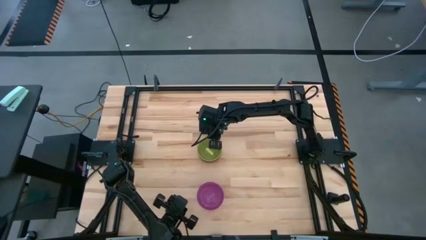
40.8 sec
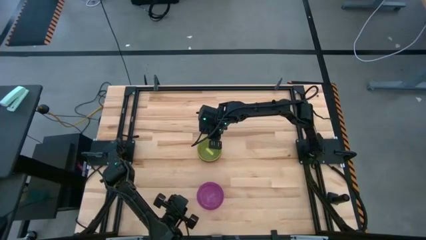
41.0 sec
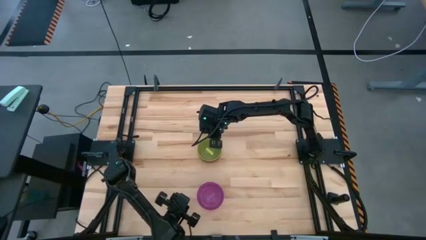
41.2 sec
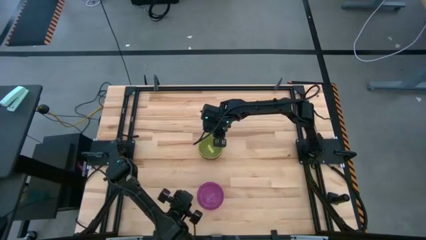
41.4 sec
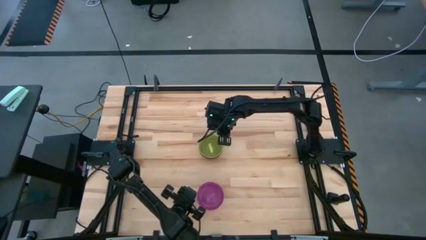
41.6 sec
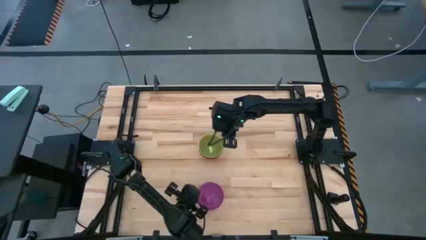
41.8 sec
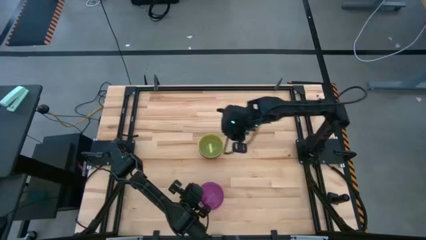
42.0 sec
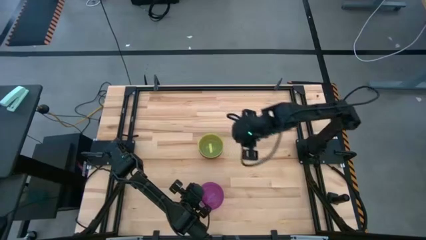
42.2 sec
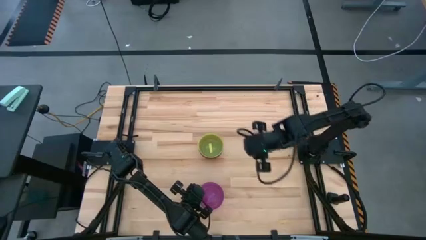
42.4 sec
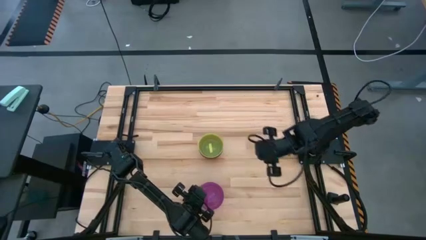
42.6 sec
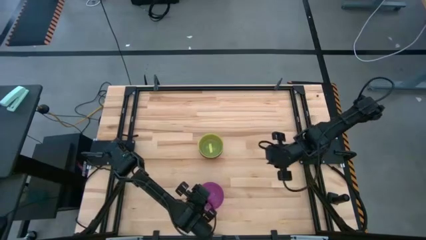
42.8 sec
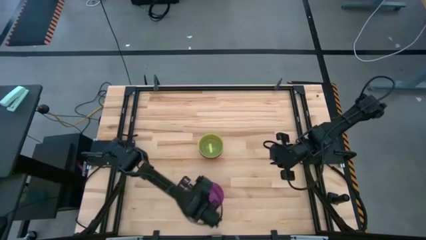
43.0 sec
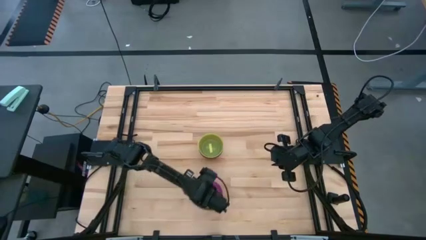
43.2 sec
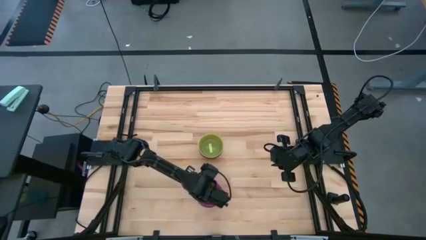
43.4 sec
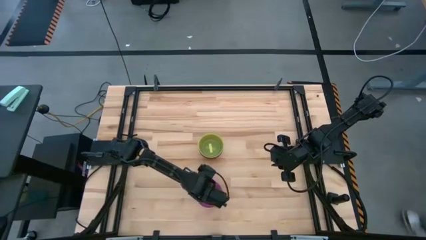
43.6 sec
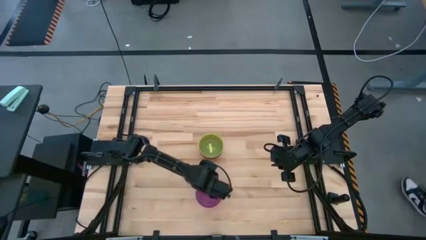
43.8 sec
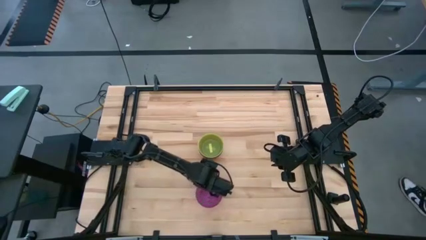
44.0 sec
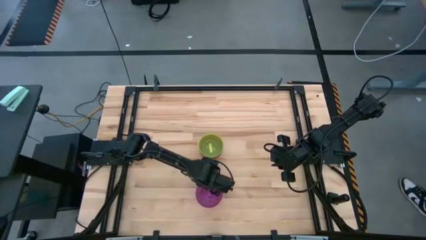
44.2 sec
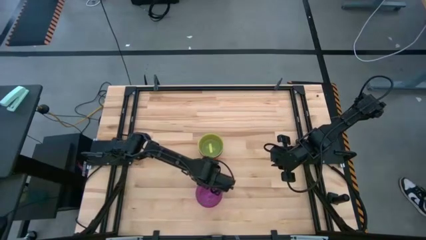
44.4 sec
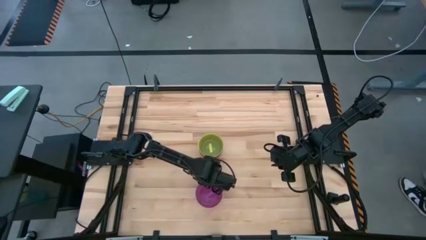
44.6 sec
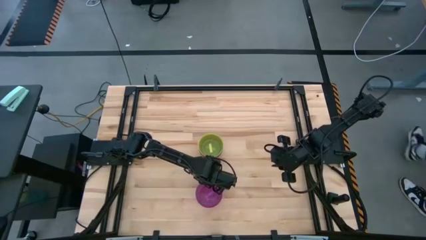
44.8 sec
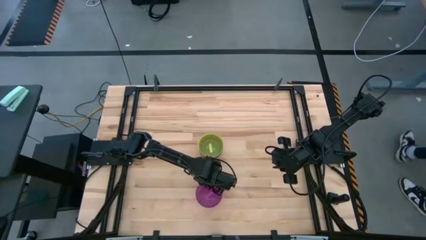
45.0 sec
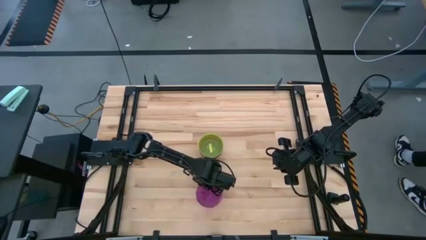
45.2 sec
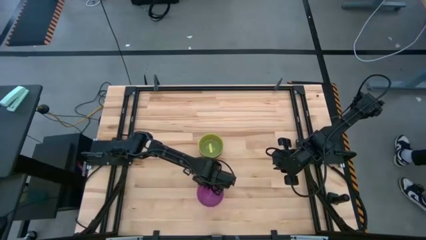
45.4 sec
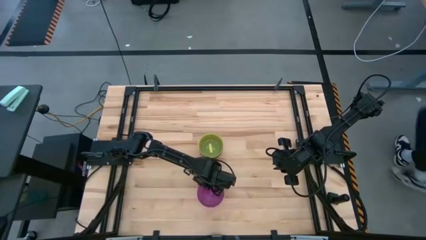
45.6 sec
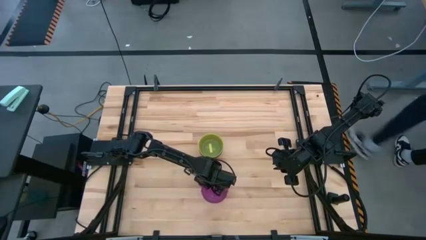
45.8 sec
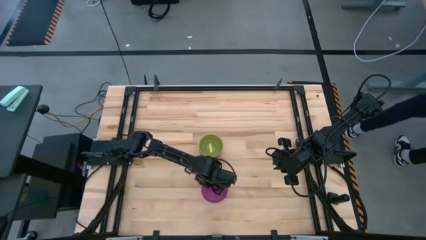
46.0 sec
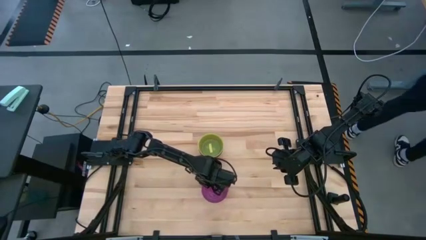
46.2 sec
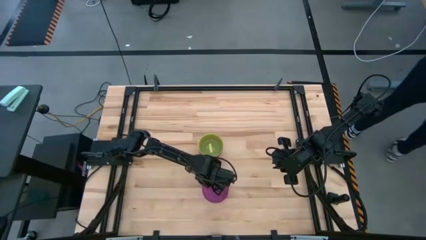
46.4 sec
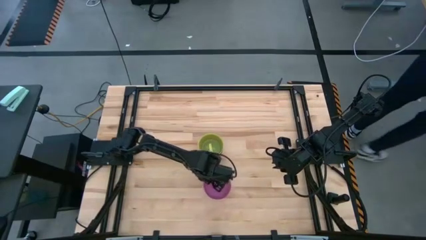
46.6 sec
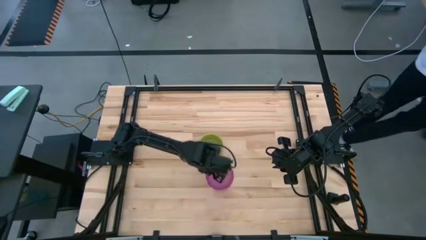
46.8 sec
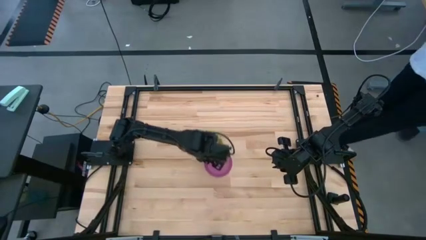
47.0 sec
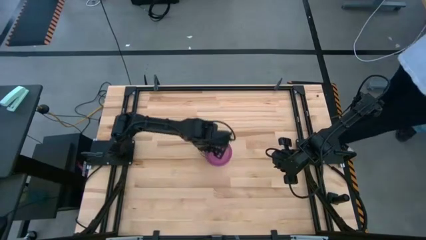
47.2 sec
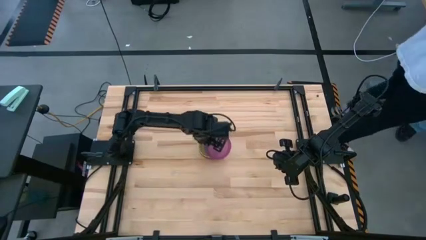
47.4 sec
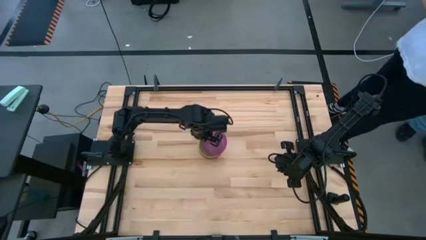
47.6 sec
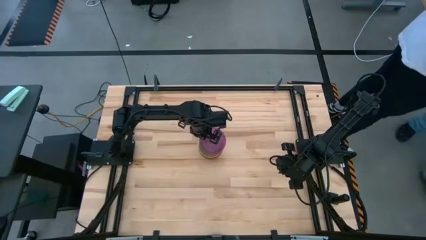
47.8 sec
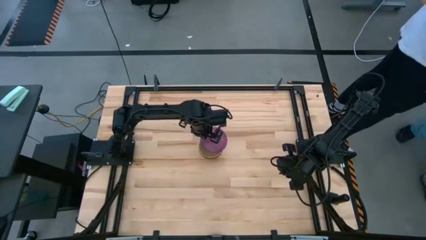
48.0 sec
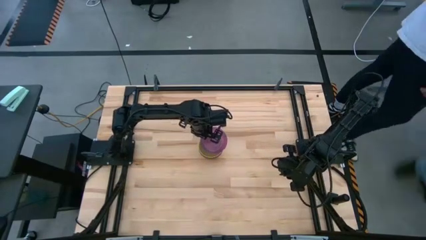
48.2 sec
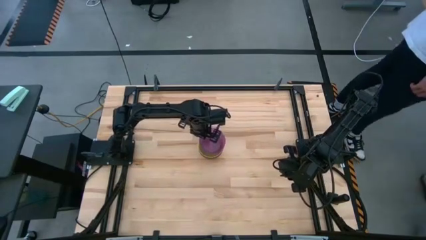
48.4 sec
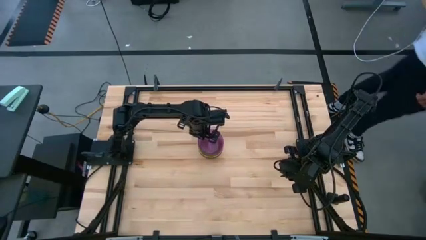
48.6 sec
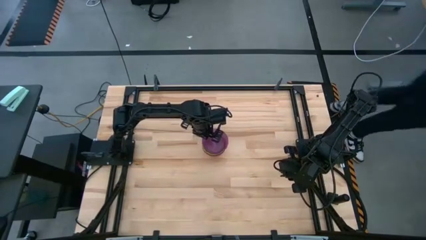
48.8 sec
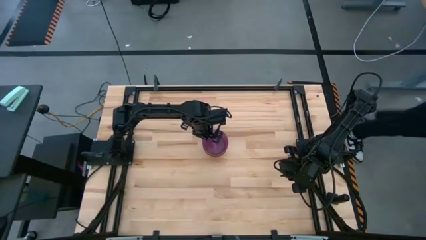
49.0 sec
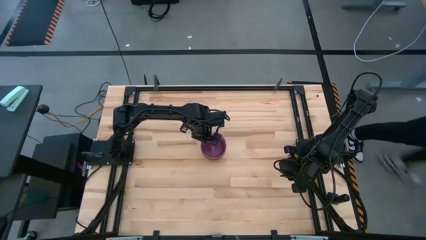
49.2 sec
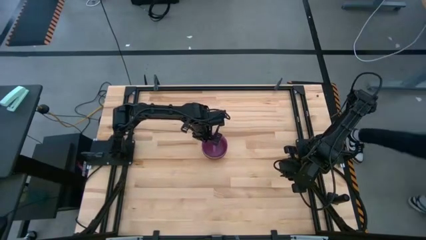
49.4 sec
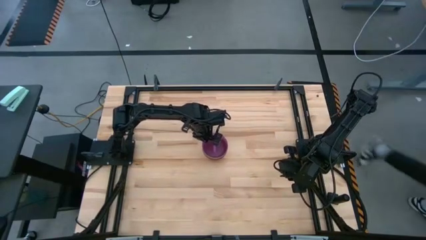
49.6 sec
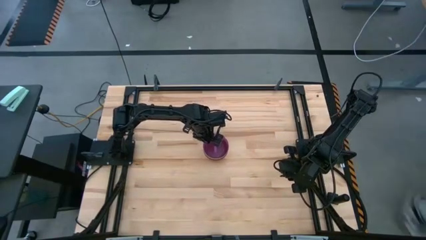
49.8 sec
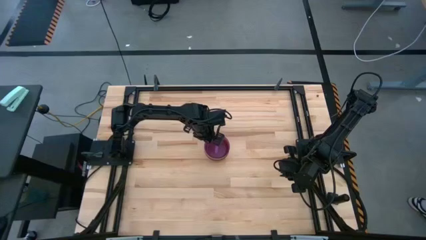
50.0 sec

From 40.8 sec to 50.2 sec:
Task: Nest bowls inside each other
Stack the purple bowl on top of the green bowl

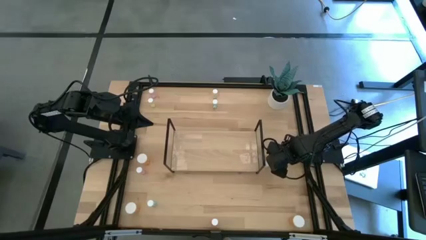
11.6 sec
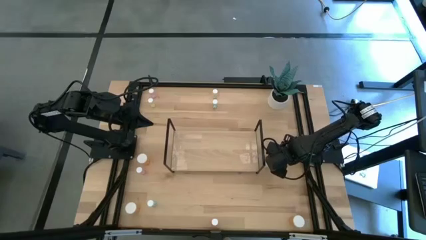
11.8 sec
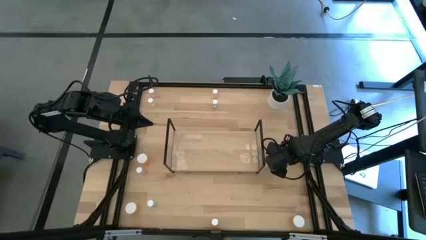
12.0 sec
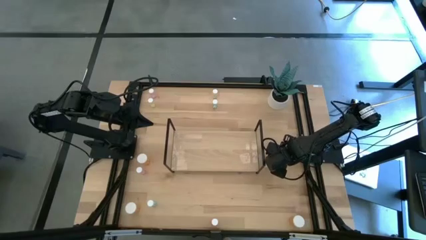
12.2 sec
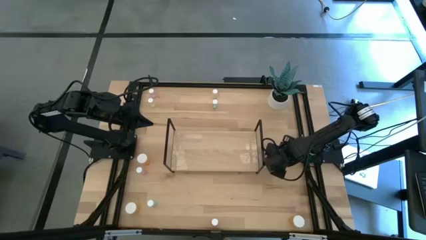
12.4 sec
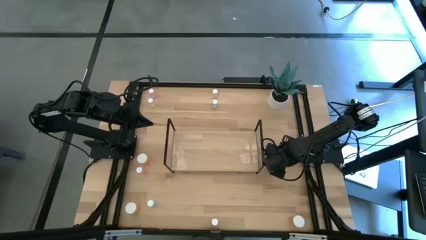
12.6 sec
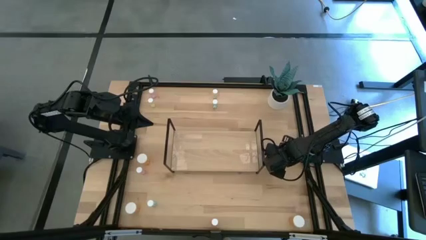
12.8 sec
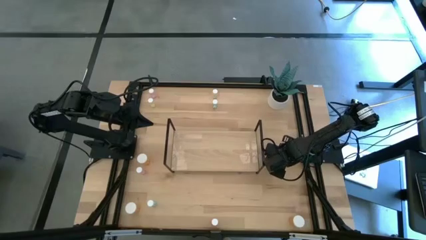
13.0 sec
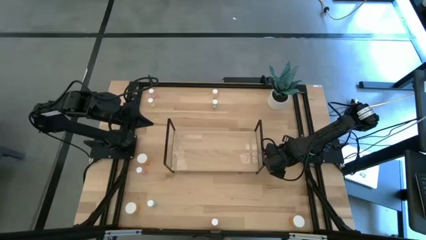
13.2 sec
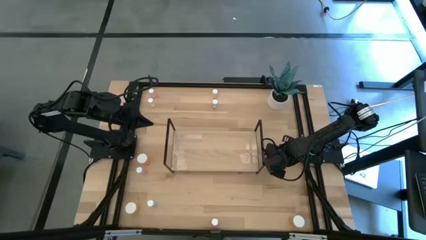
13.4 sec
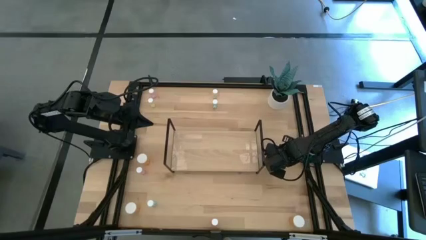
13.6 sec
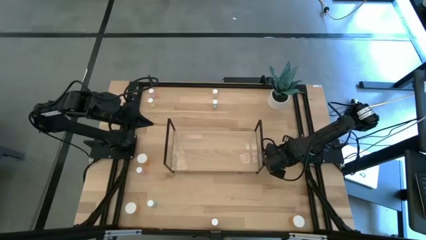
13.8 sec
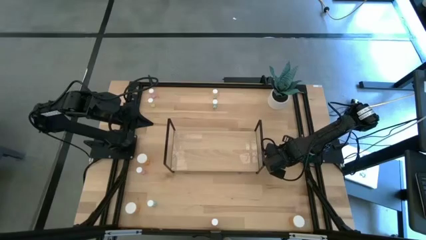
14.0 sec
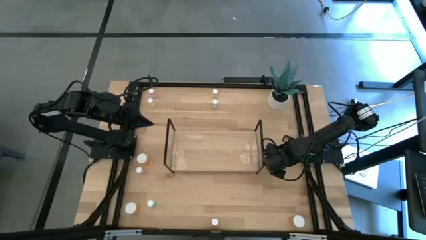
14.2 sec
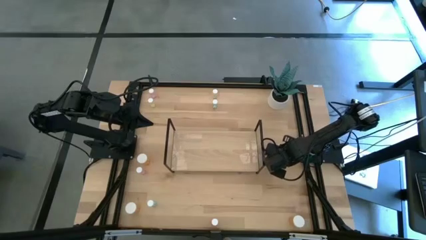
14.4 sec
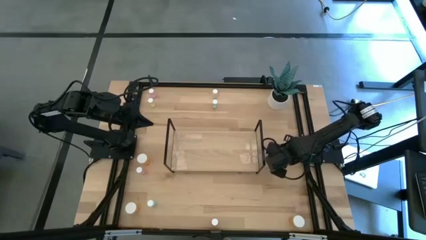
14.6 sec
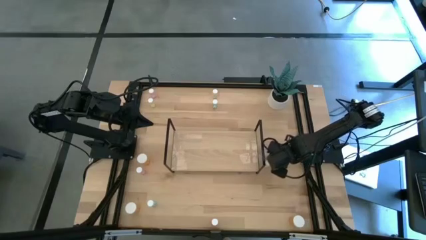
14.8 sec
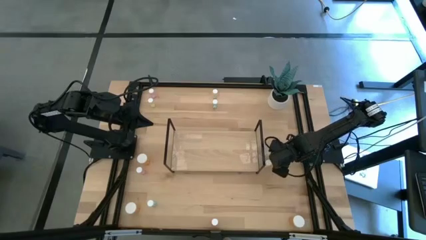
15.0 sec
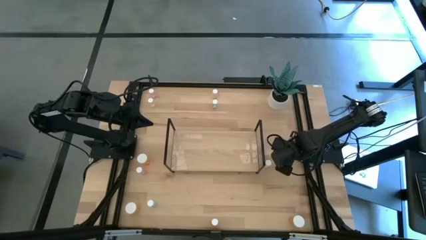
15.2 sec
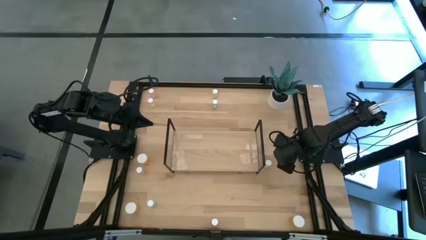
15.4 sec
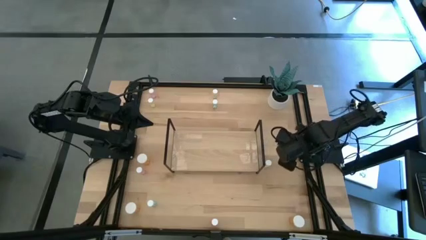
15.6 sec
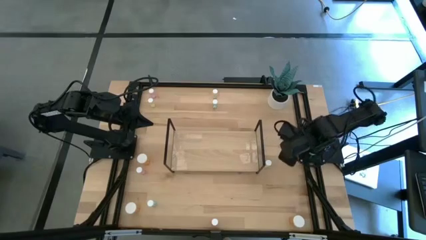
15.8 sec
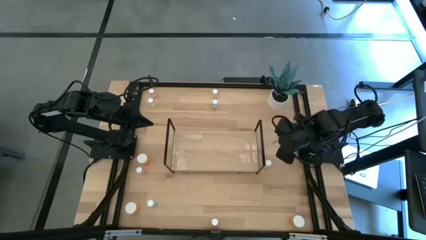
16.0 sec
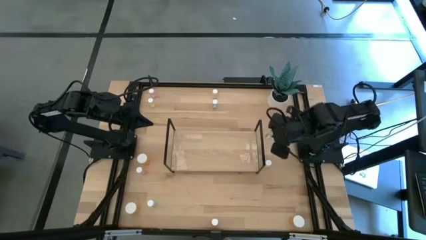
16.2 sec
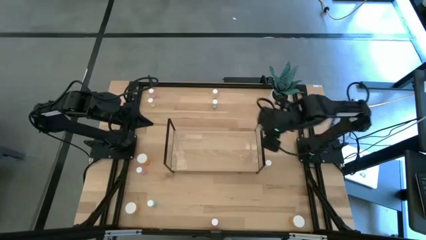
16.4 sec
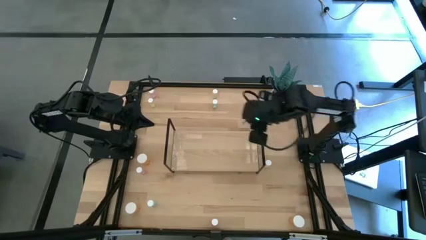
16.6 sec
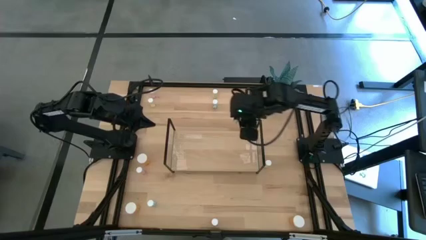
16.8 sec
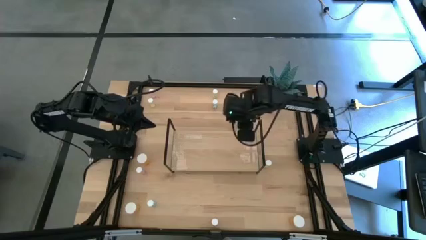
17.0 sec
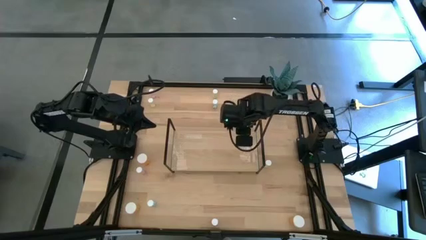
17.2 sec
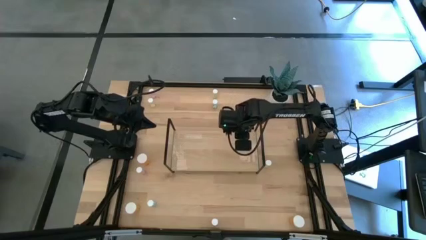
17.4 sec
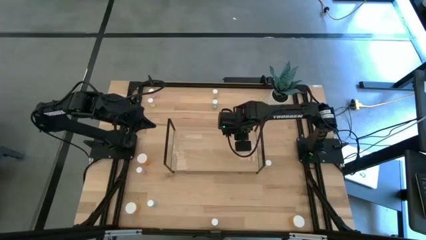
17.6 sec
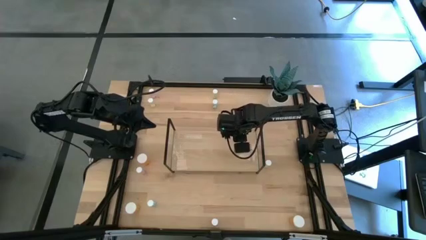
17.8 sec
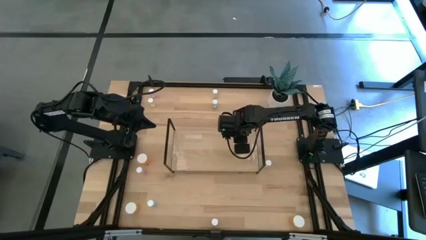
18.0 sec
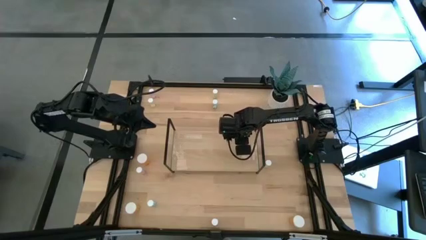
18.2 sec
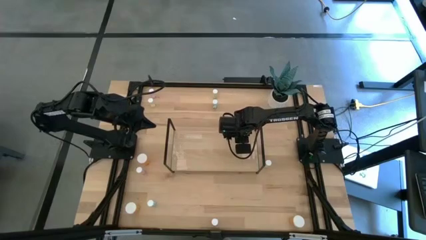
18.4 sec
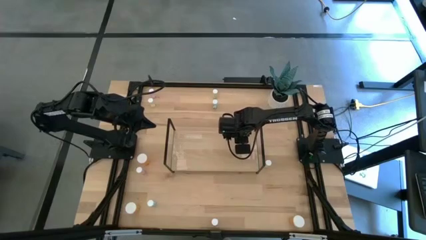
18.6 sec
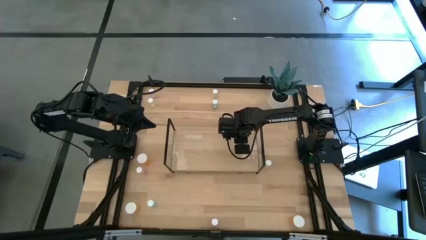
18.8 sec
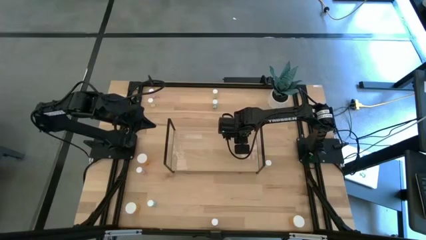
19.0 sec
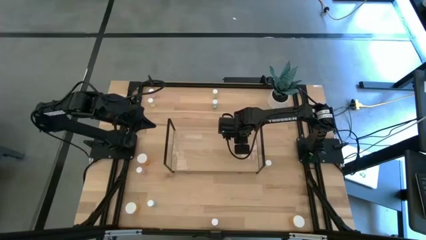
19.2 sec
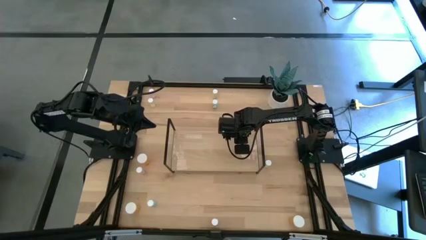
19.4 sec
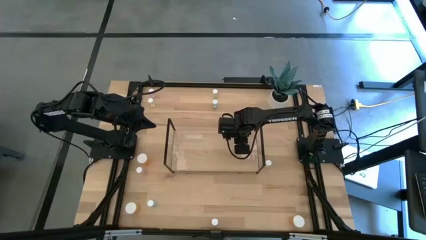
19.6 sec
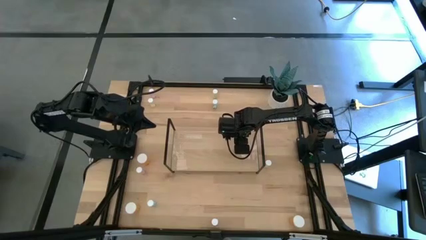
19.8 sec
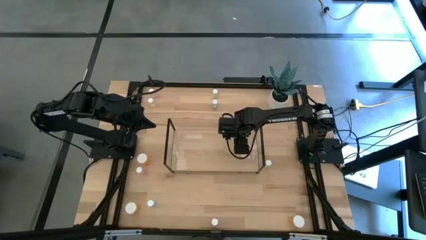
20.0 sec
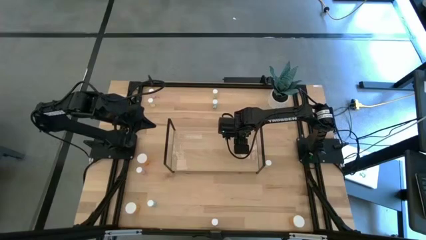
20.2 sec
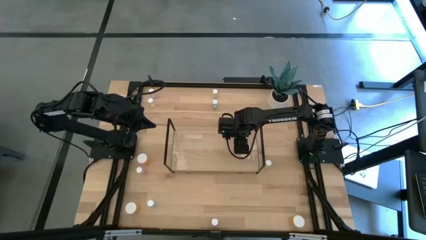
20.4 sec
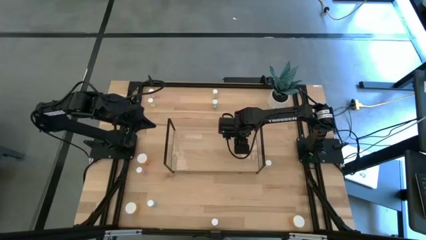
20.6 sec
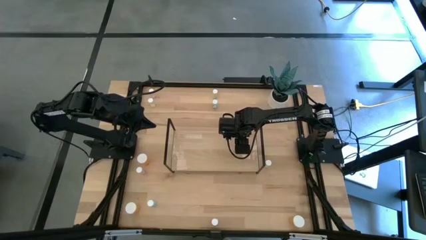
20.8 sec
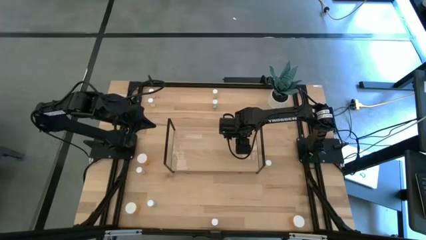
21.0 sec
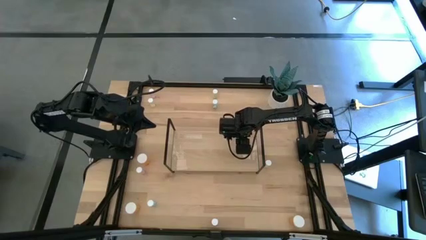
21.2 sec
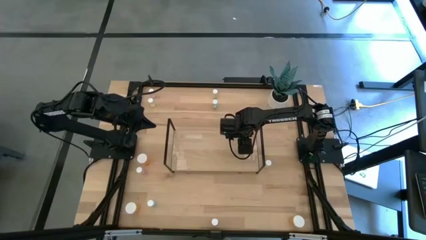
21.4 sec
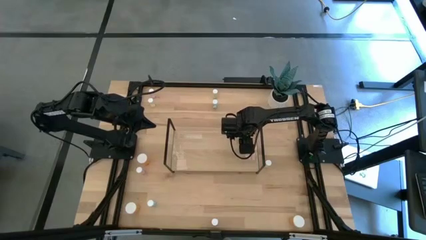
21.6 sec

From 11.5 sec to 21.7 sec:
Task: Pick and place medicine bottles onto shelf by color
Put the middle right blue pill bottle on the shelf
